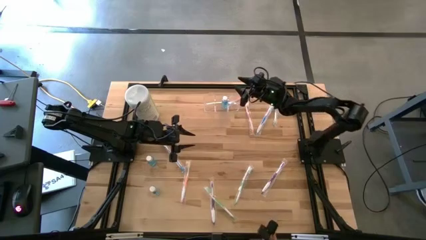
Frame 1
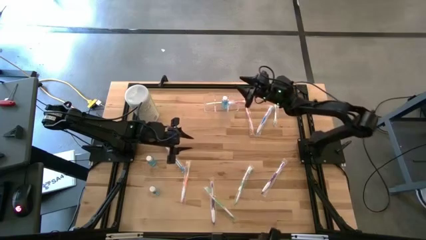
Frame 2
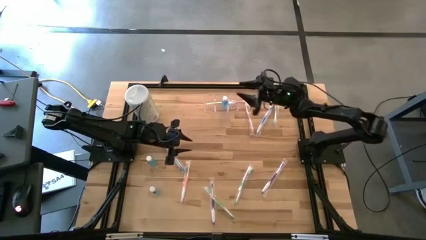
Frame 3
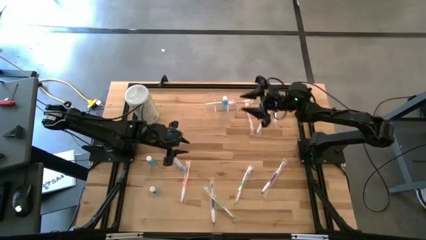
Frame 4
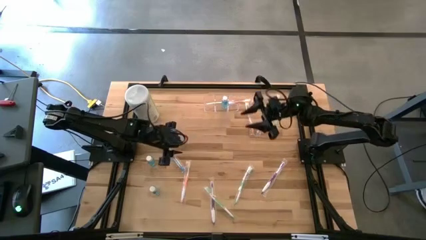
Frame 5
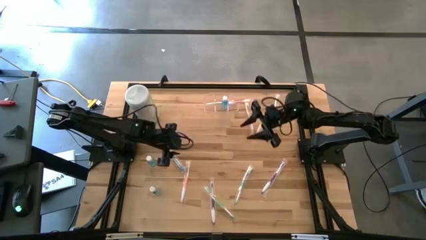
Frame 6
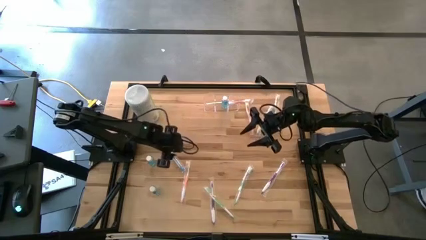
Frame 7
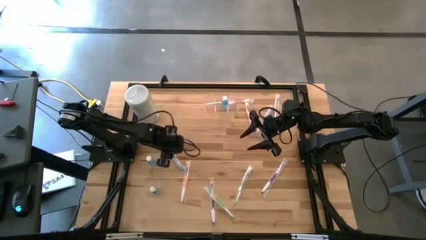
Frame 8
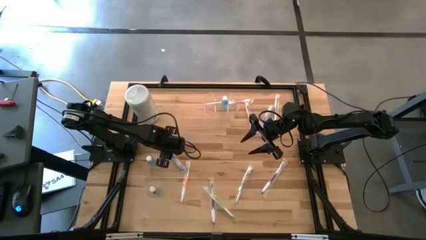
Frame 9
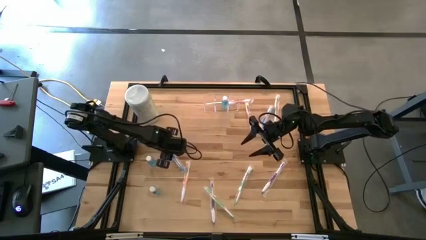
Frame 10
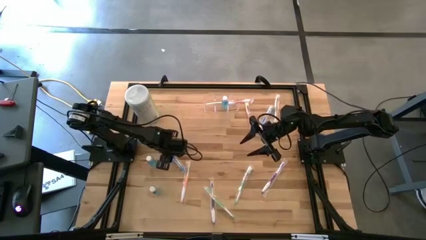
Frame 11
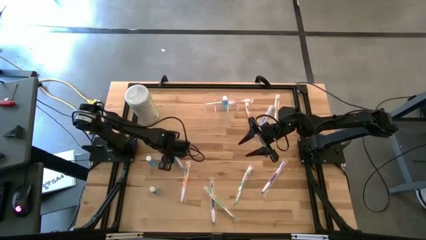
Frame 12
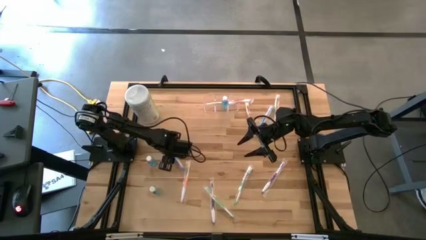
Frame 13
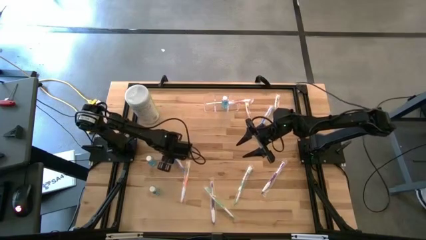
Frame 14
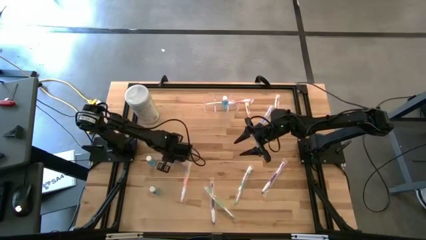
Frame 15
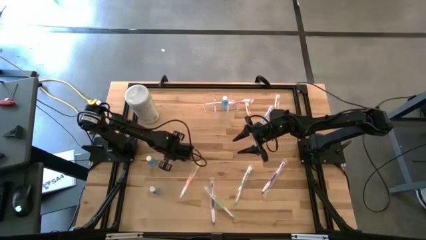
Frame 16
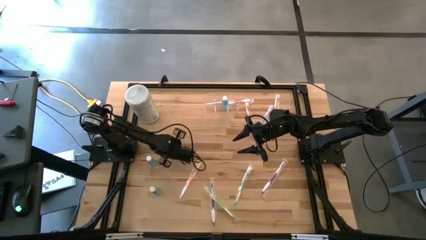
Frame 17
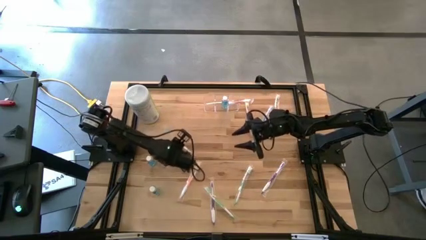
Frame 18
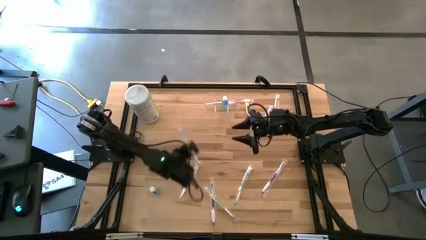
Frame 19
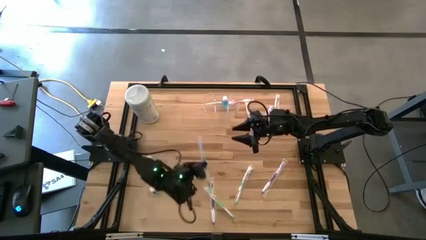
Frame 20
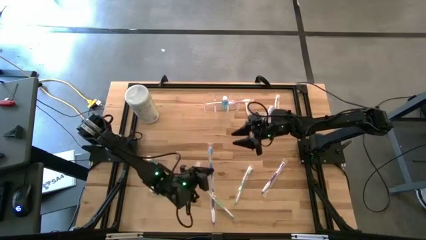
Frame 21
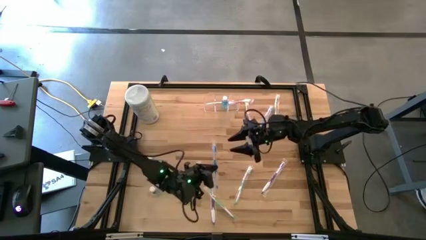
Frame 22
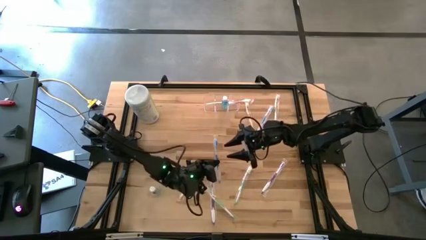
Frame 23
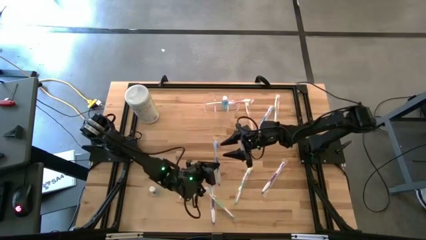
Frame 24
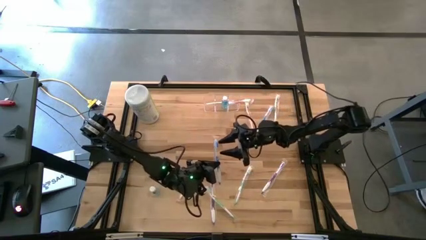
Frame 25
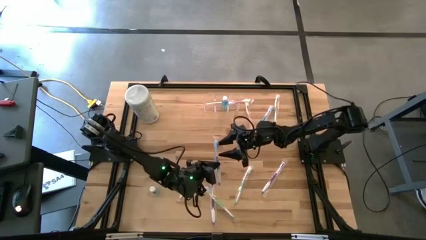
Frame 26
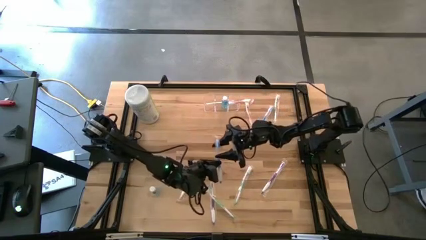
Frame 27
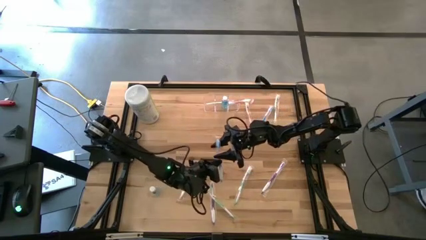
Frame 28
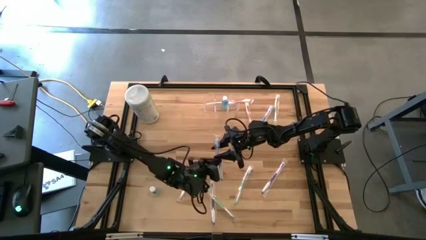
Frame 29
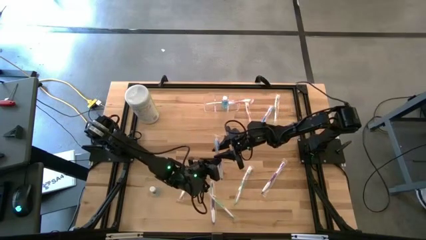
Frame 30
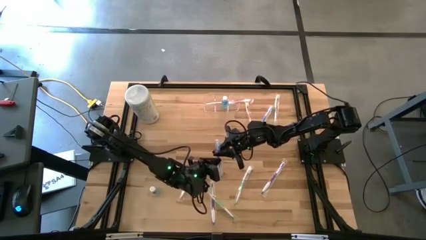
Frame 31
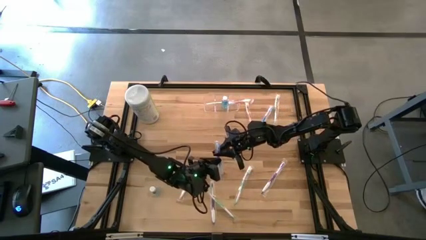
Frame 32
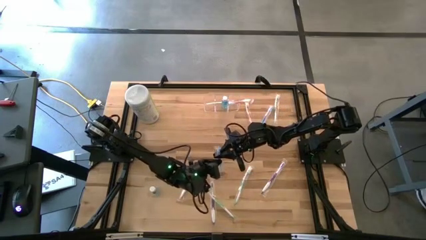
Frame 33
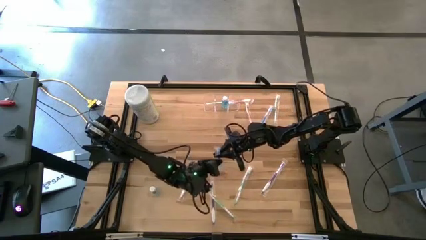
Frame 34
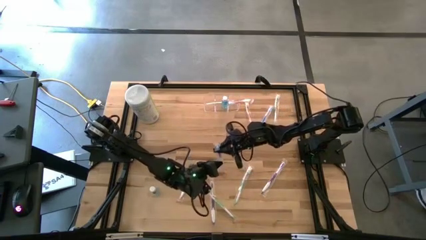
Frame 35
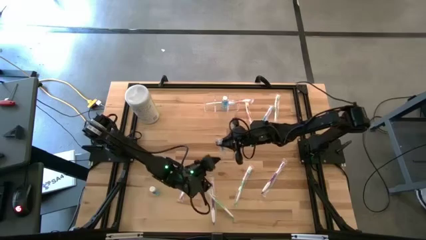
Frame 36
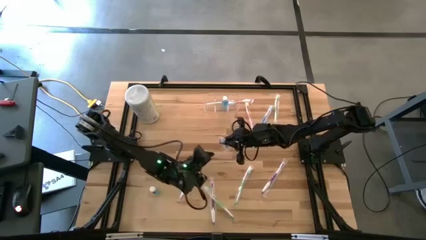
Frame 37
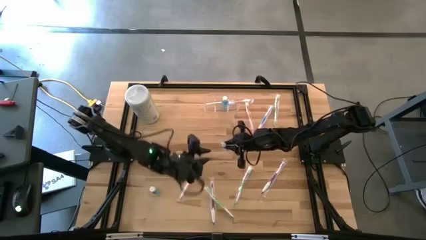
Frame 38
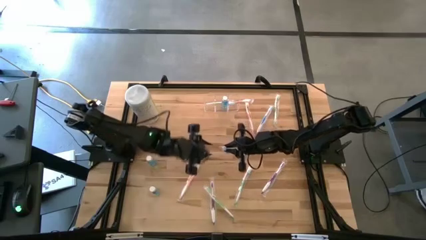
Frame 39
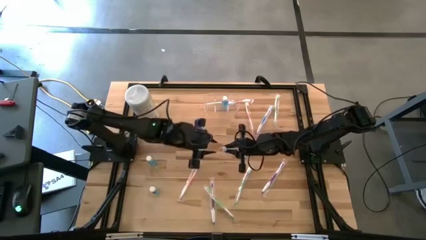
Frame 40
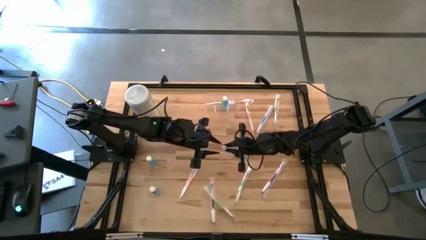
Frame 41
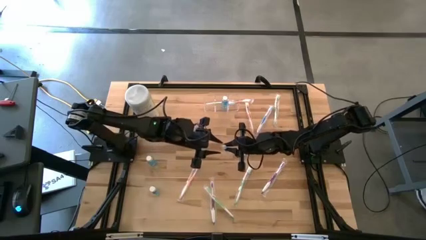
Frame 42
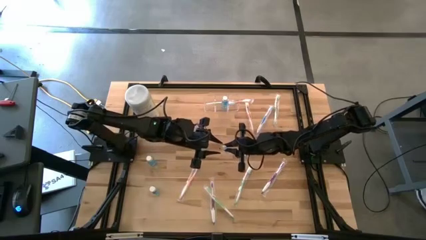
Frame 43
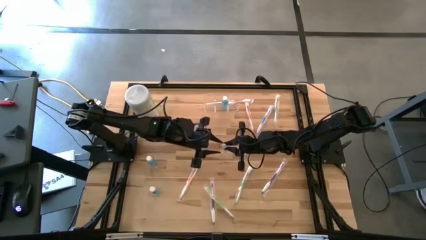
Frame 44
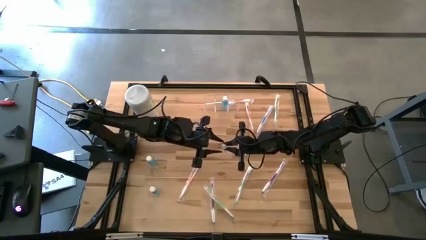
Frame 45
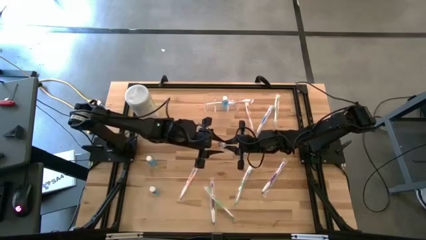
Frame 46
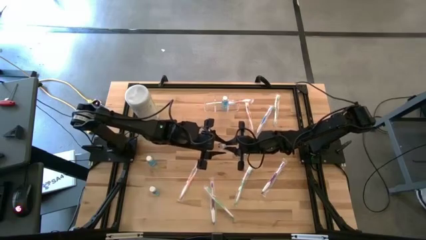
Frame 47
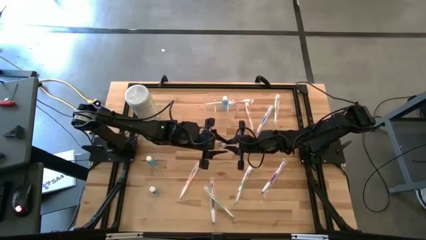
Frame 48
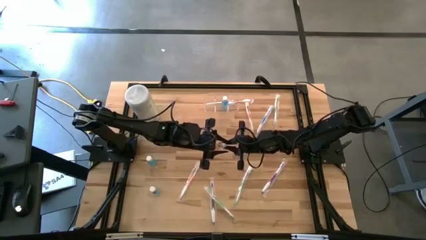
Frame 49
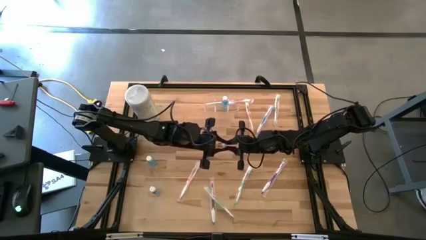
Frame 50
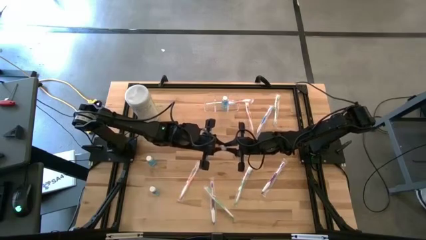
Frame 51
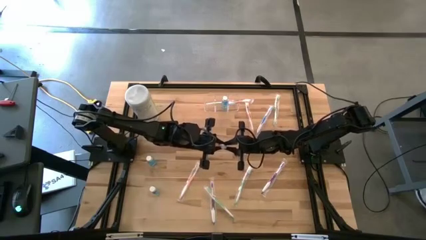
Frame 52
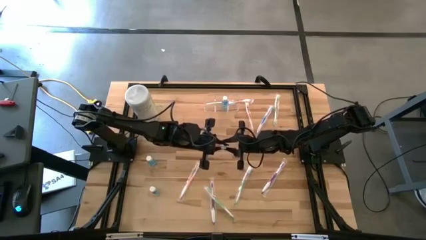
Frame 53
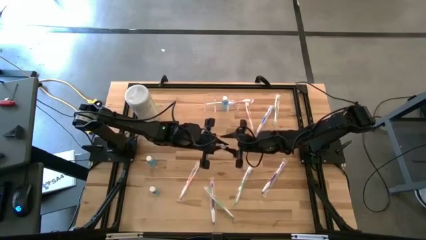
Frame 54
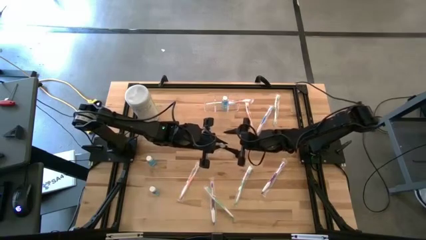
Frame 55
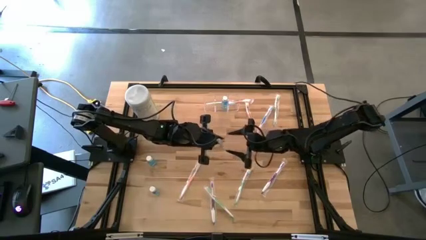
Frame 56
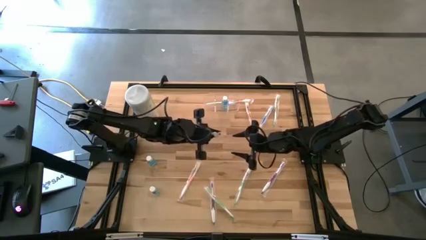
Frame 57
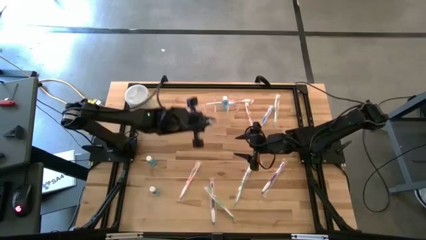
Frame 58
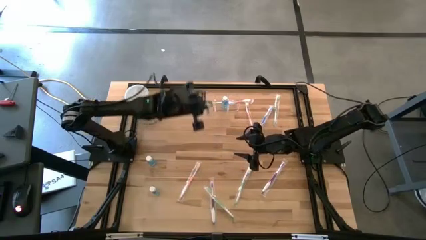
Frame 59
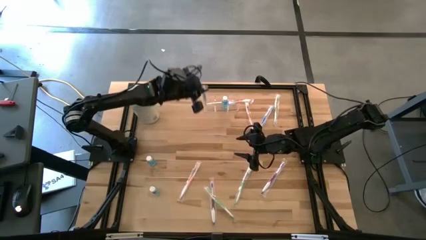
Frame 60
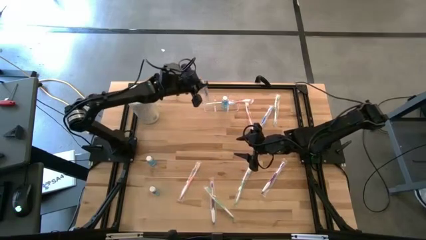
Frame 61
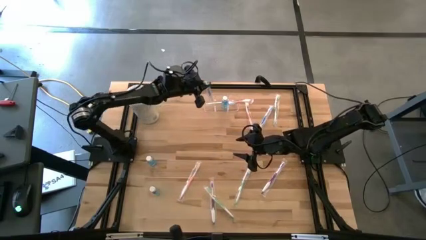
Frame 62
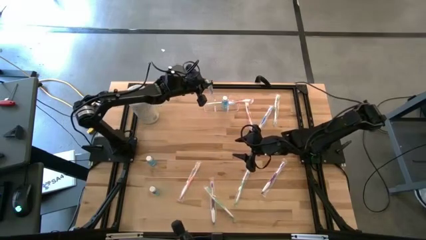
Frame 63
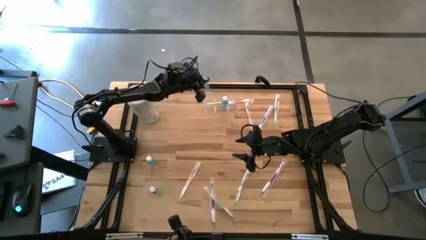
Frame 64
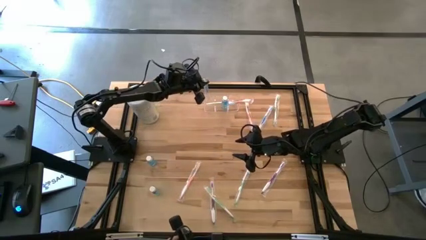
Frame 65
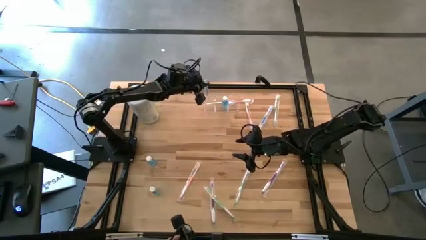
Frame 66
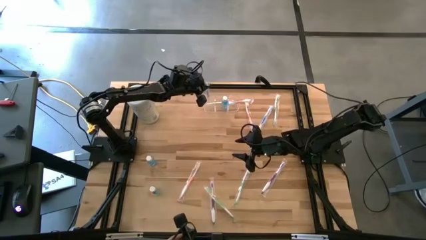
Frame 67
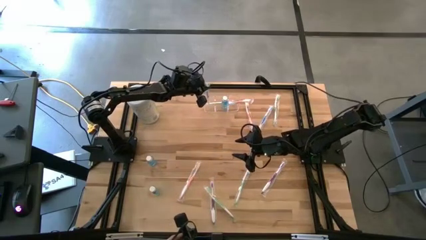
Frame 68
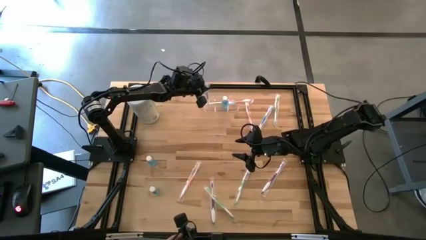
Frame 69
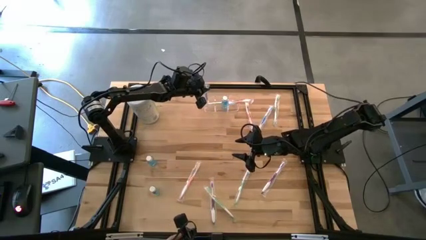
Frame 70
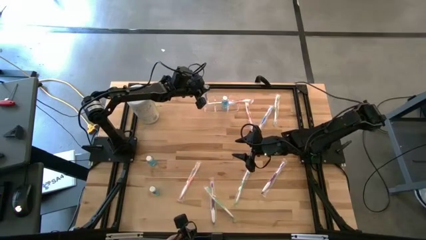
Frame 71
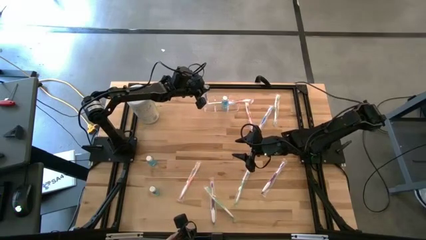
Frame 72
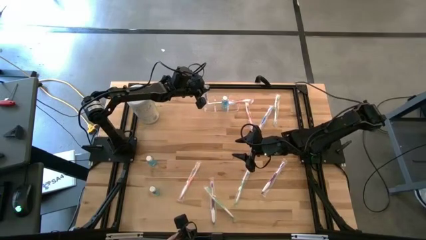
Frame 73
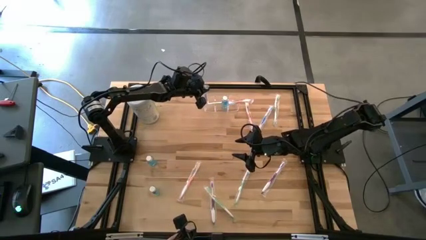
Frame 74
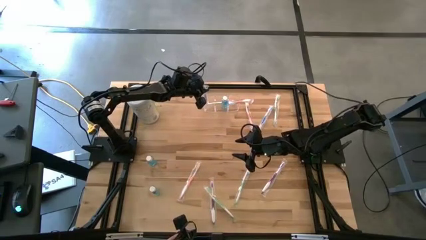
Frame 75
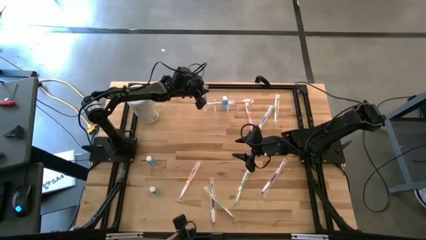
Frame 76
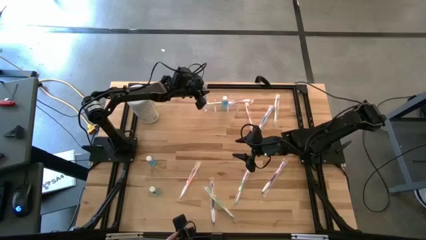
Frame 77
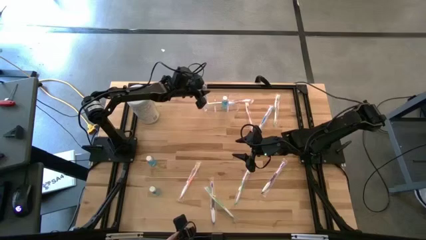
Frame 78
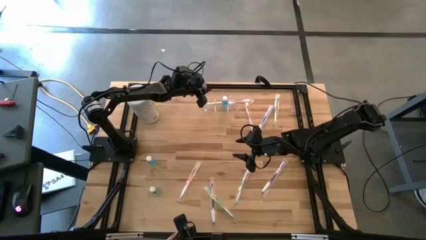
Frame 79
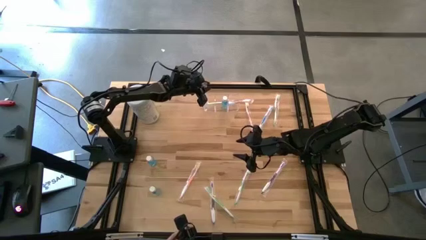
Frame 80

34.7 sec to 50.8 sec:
Task: Pick & Place toothbrushing station
Put the bottom blue toothbrush into the transparent organizer
